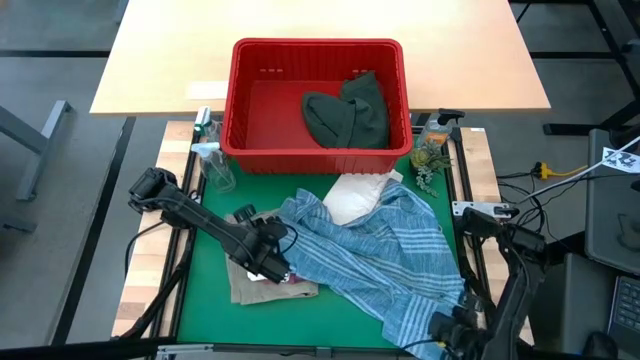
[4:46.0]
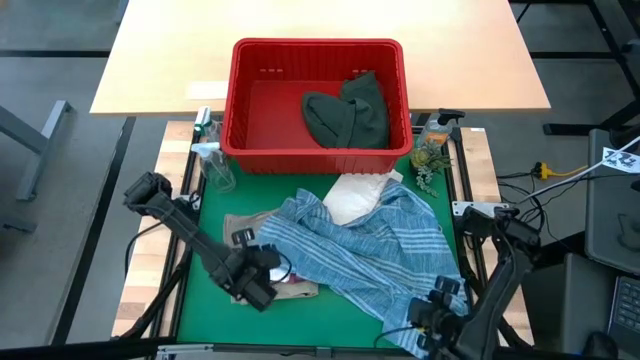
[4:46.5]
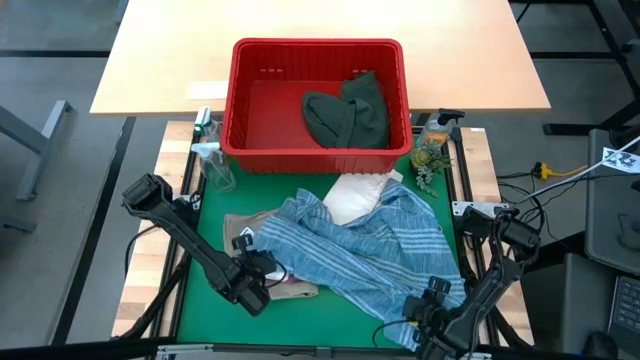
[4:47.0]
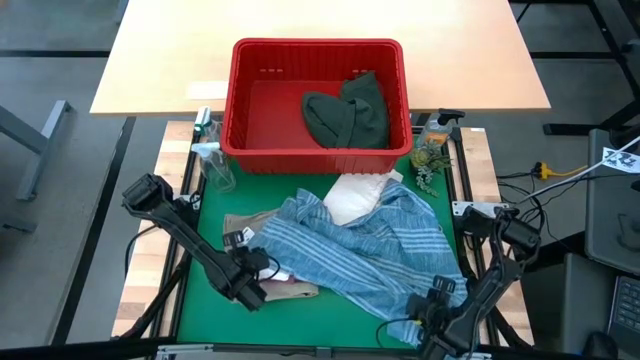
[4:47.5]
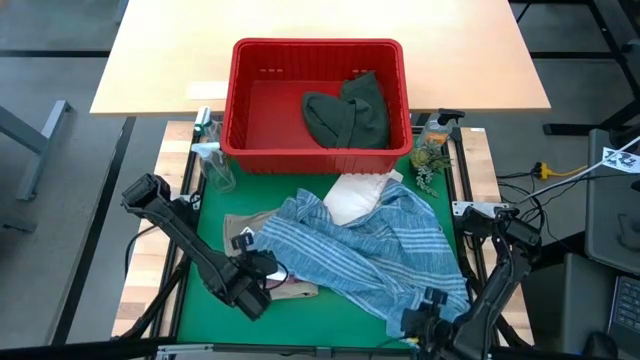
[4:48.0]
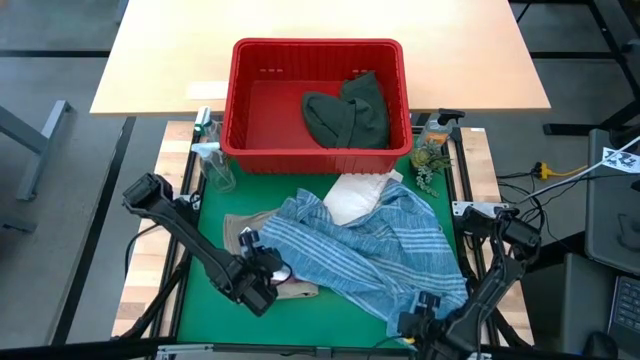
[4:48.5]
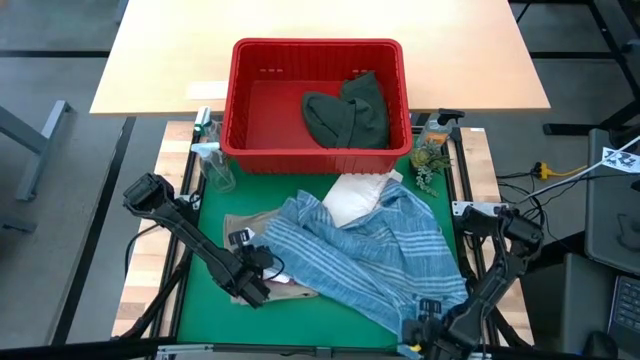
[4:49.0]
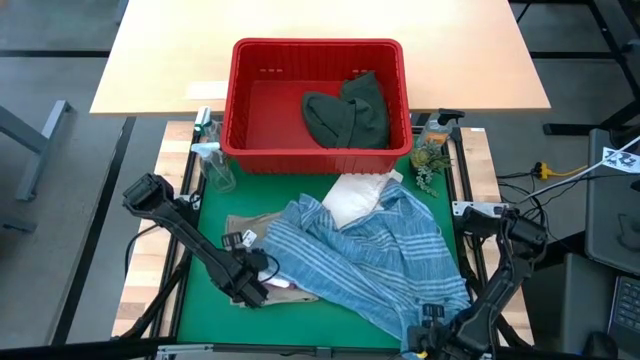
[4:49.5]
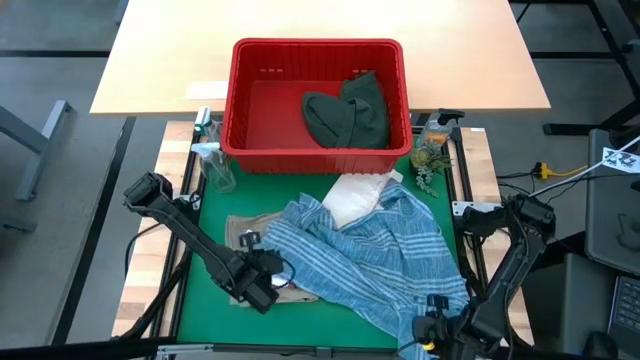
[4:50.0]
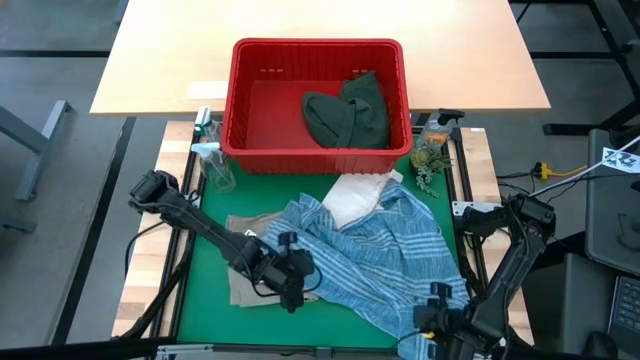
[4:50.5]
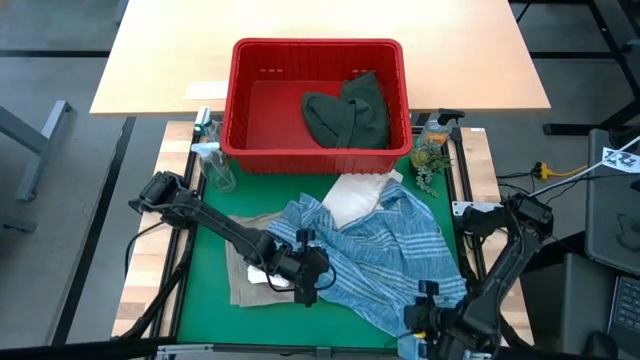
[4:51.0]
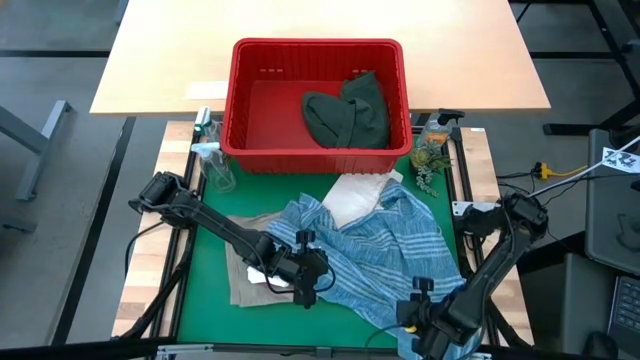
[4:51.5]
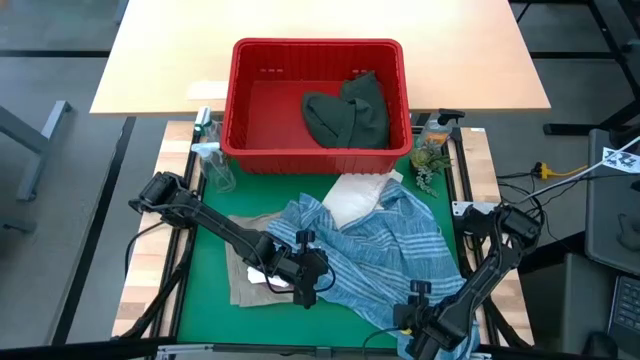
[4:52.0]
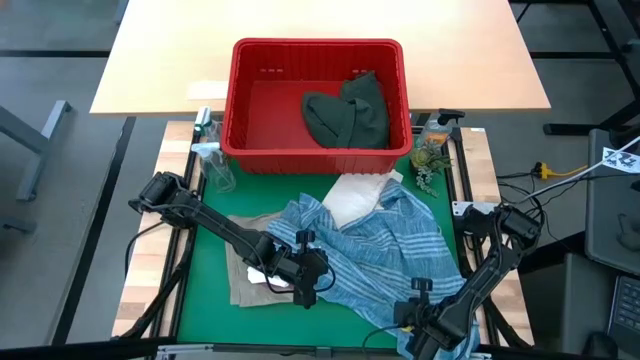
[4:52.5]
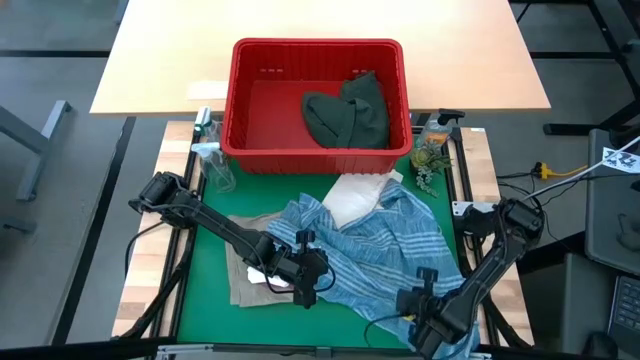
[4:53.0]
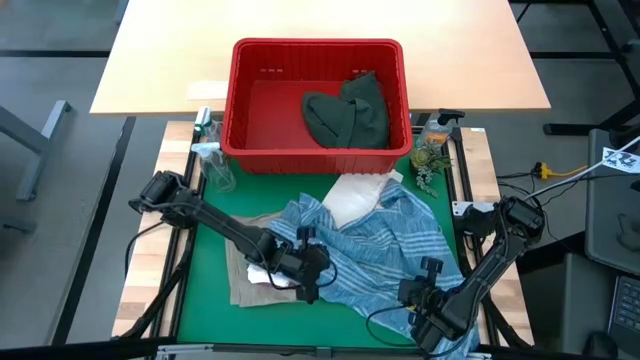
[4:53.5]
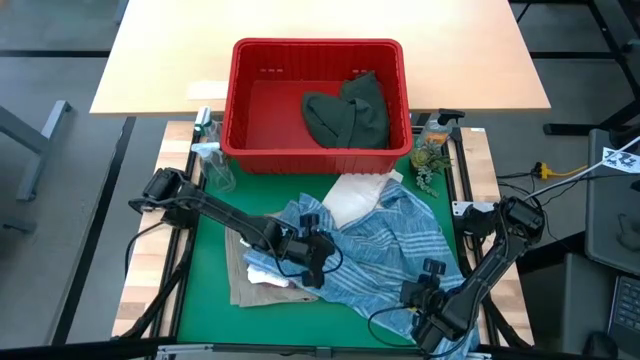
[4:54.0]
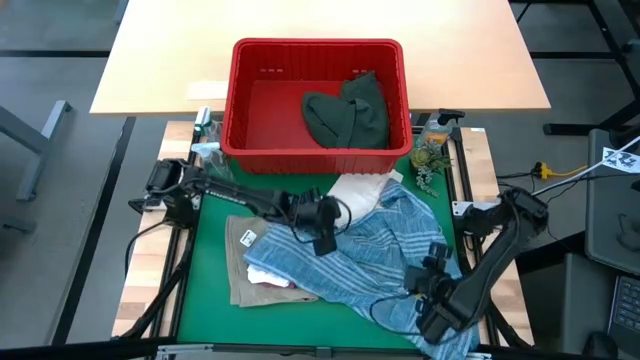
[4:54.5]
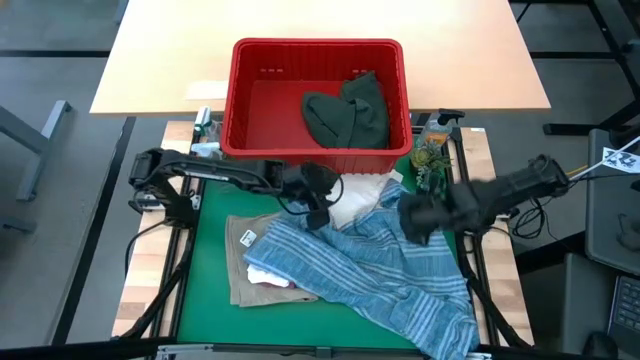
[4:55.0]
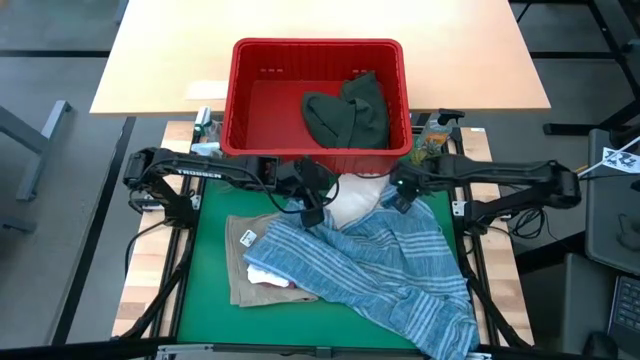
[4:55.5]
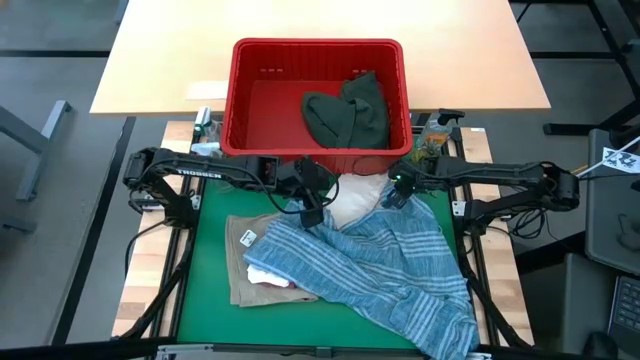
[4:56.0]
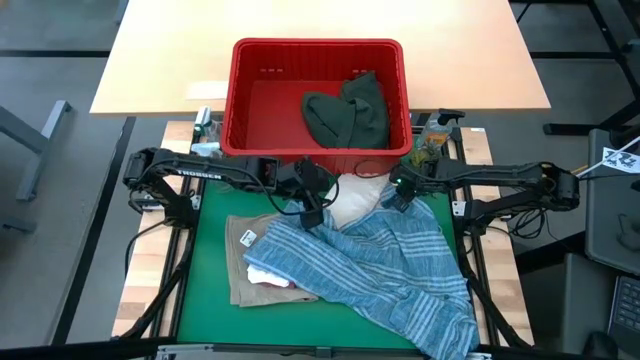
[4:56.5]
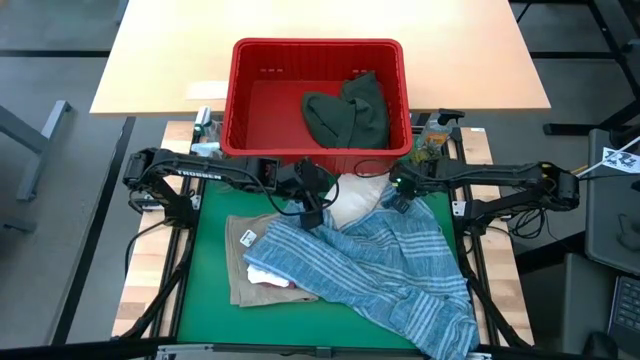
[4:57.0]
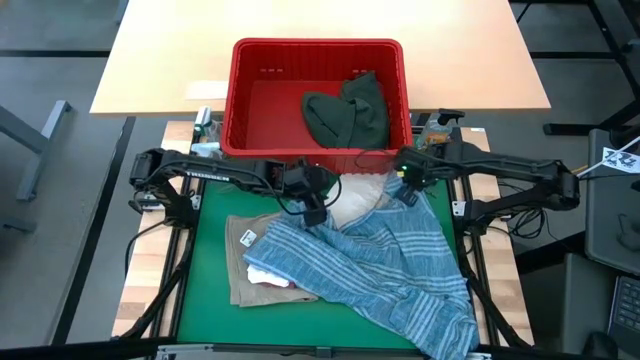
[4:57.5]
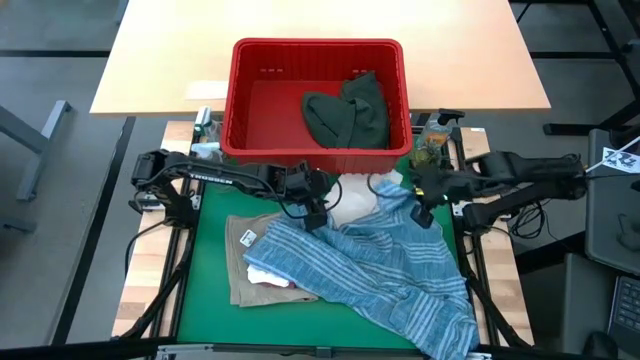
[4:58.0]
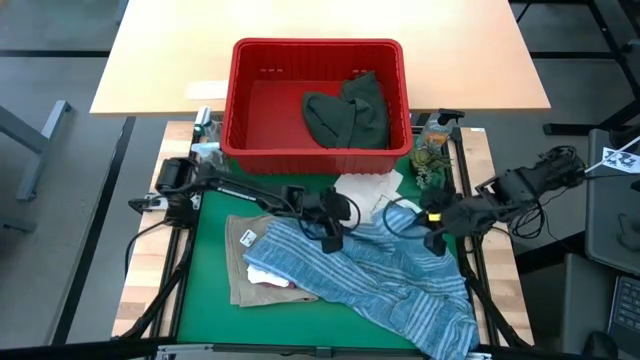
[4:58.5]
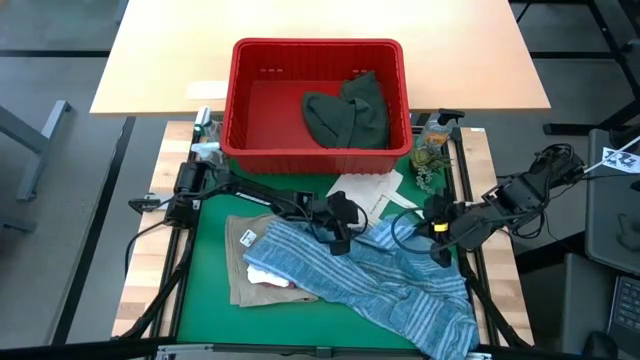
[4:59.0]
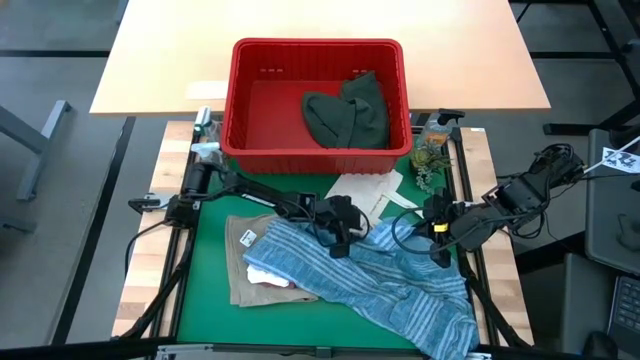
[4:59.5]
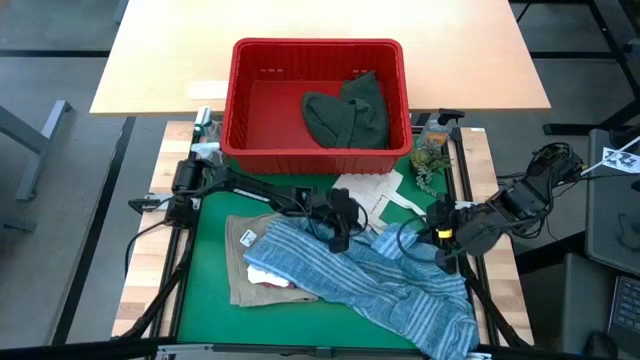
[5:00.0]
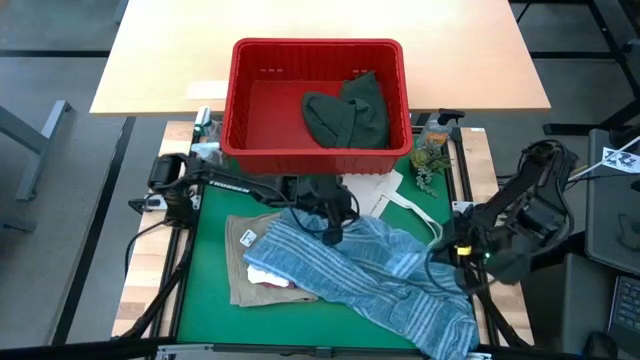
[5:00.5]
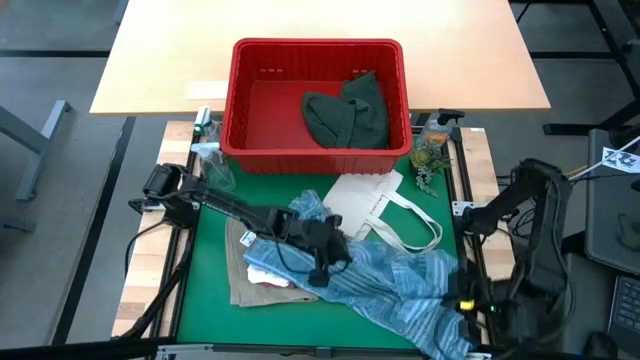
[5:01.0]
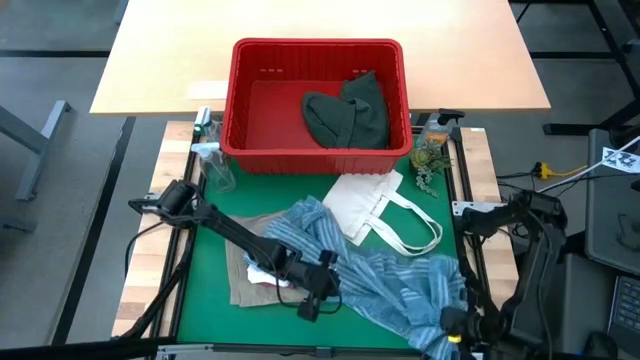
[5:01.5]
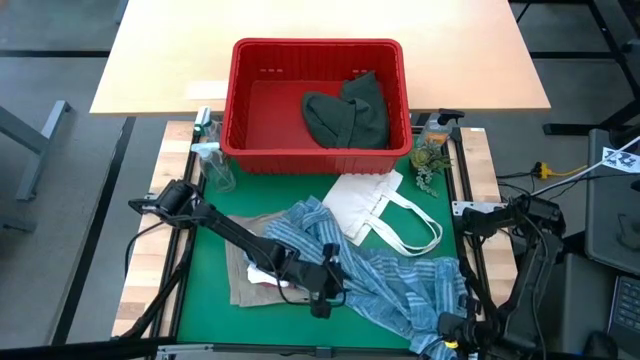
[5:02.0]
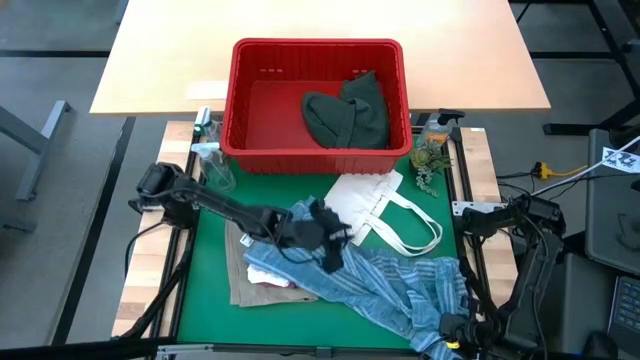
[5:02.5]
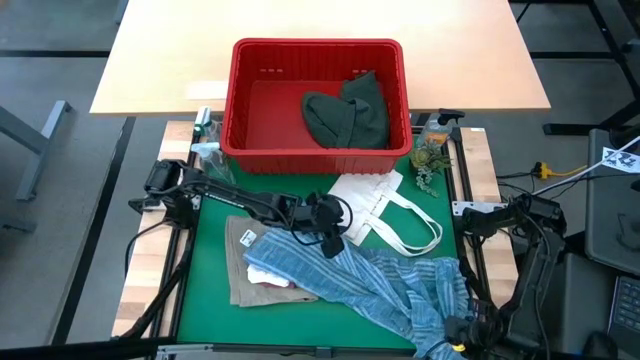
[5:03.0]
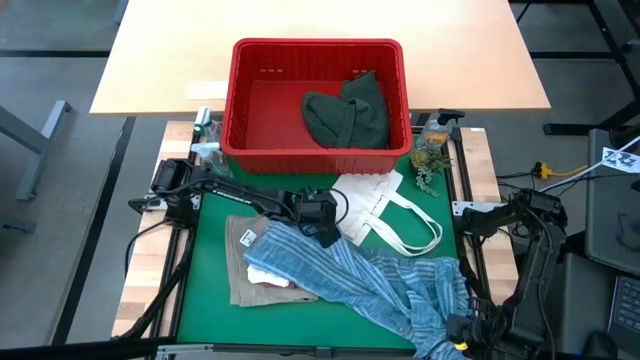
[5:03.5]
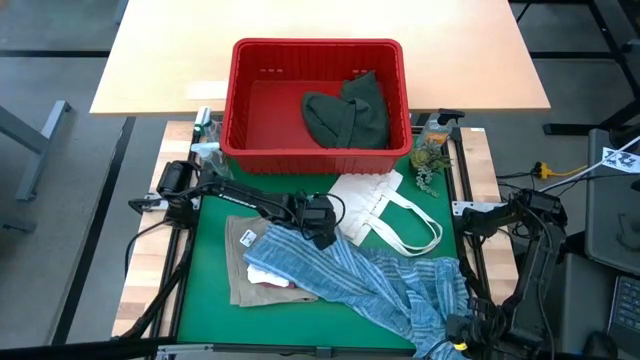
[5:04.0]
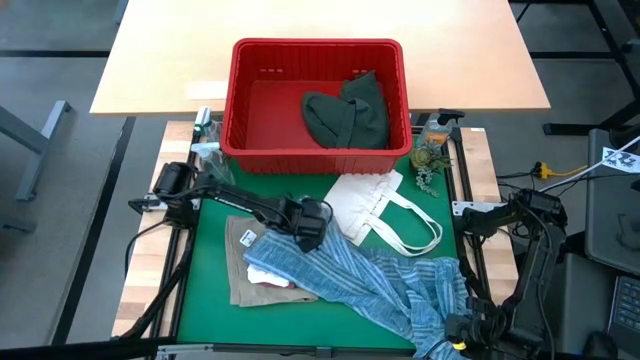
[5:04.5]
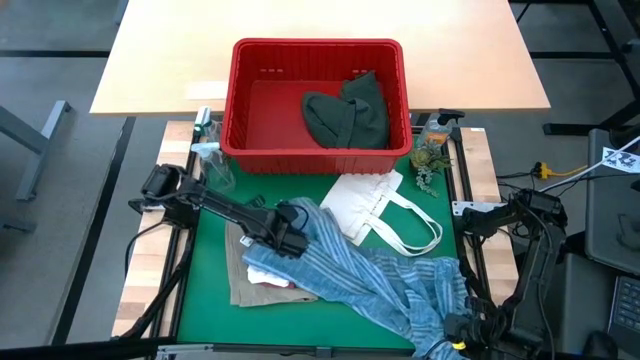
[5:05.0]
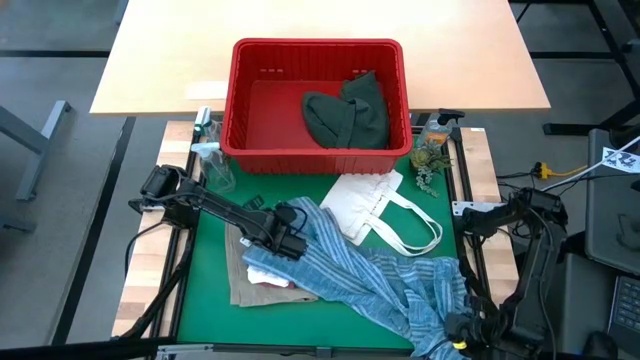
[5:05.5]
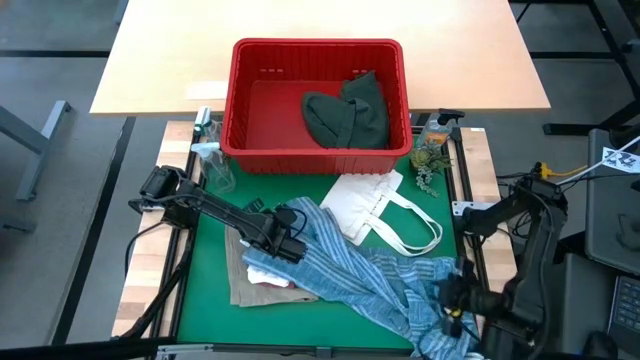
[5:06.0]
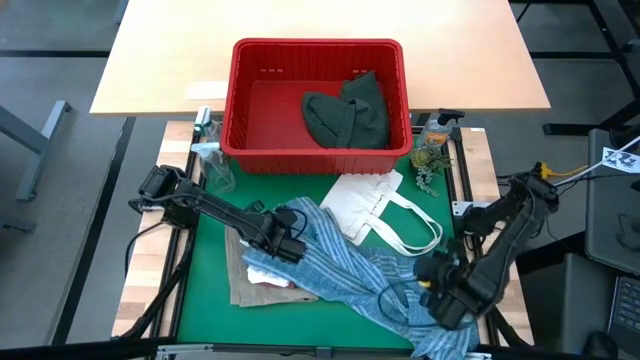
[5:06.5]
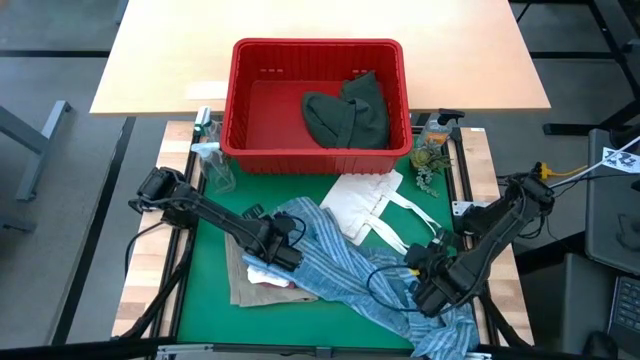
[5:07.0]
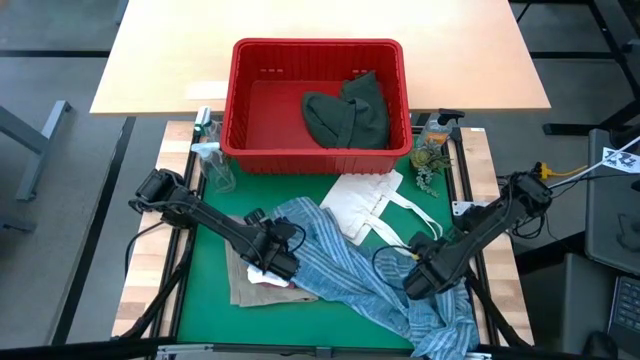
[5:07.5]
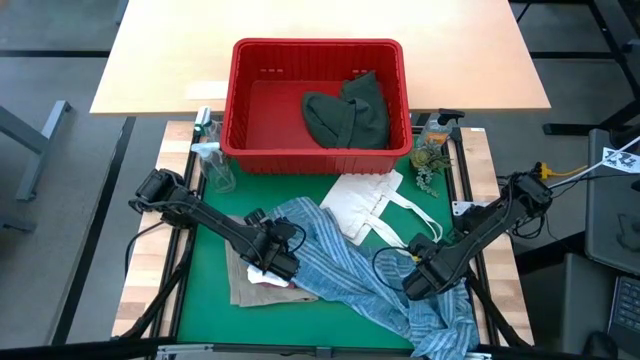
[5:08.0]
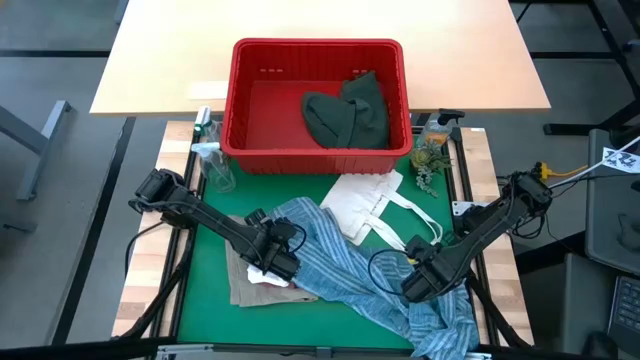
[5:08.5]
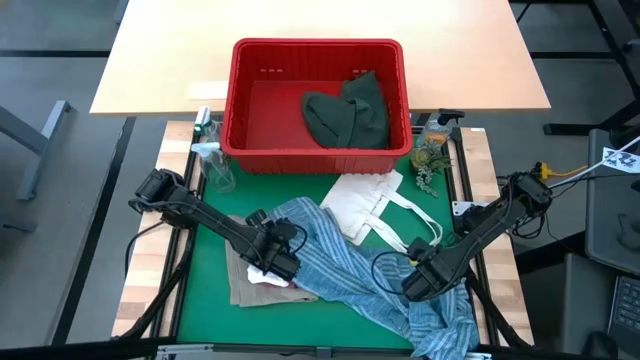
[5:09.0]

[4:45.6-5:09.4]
Task: Fold Laundry from Bin
Fold the blue polo shirt
